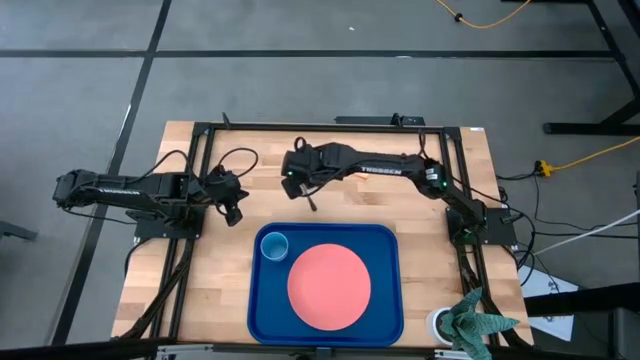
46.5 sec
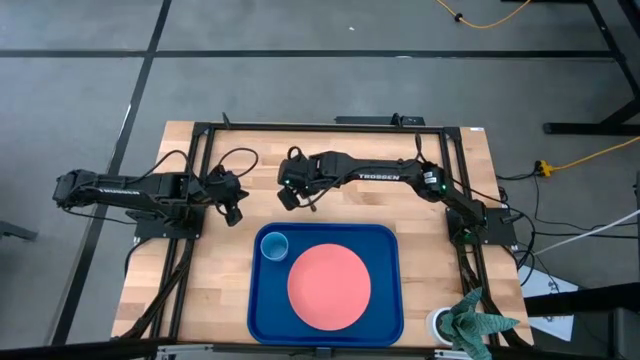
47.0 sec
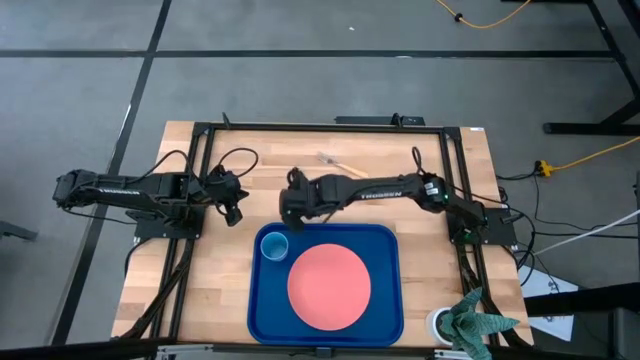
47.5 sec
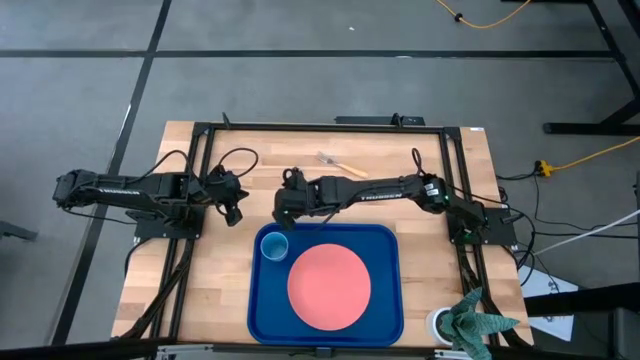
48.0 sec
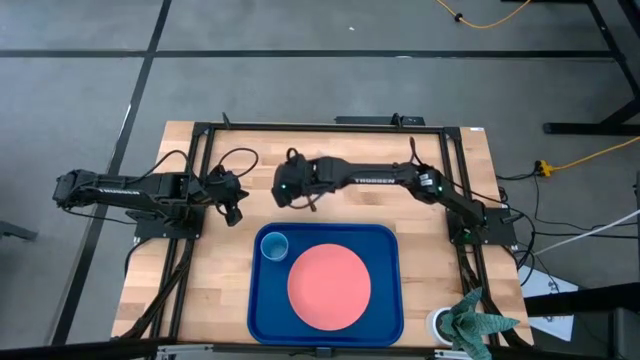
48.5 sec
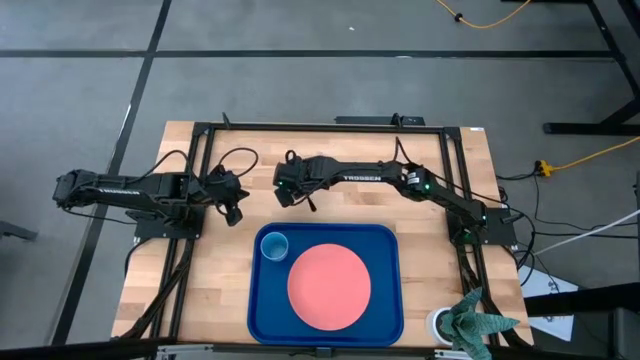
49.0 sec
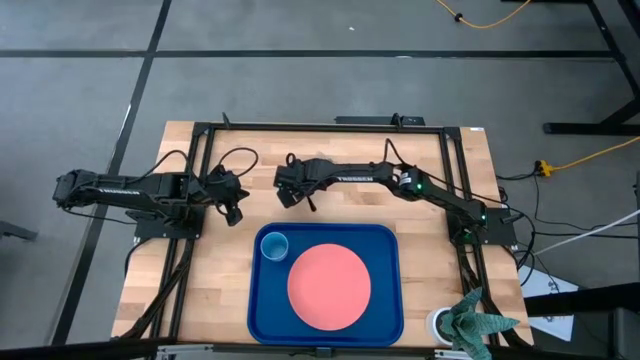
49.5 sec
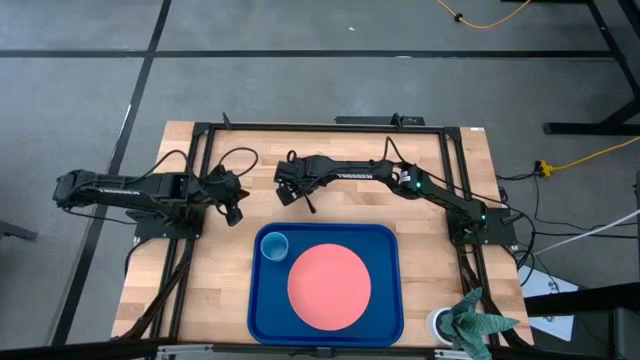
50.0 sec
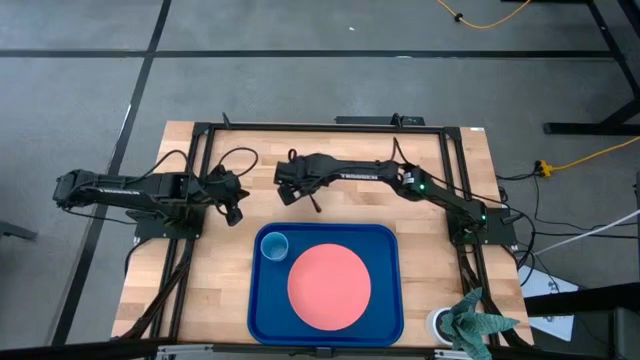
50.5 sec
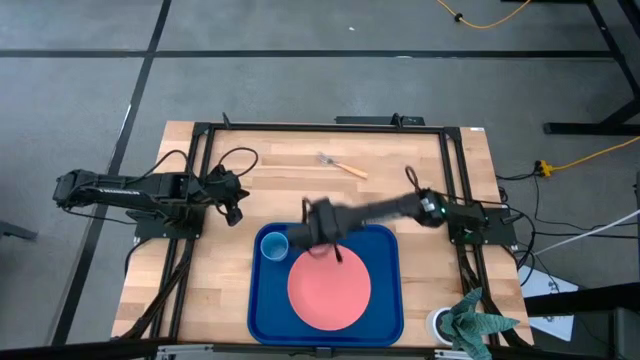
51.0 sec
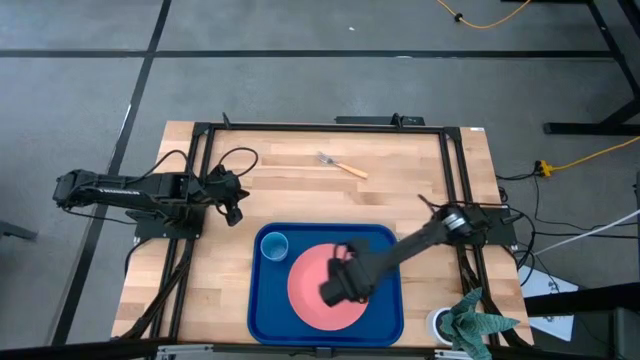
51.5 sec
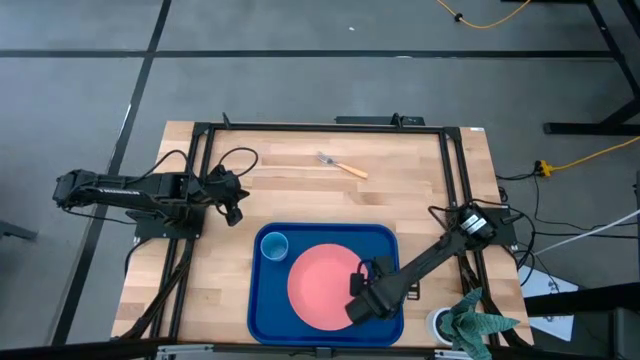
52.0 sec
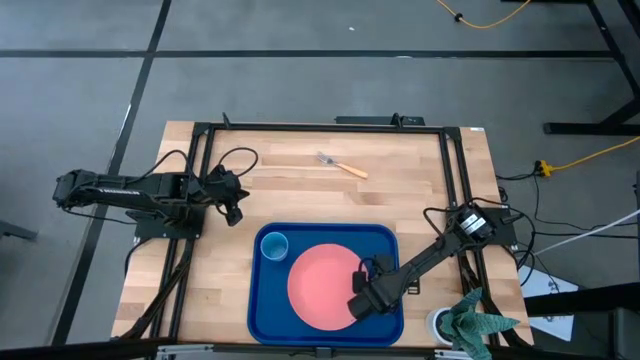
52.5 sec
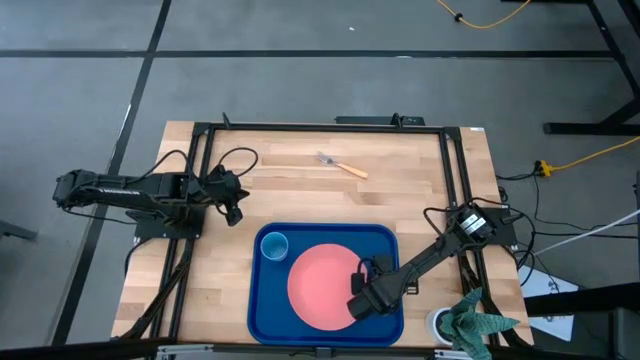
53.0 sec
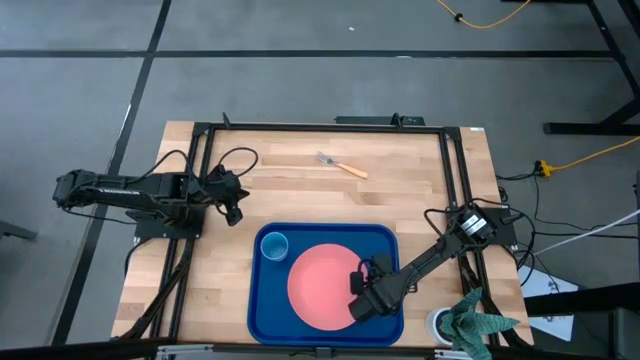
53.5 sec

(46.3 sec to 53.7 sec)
Task: Pick and place plate/cup/fork/spoon on tray
Put the black spoon on the blue tray to the right of the pink plate

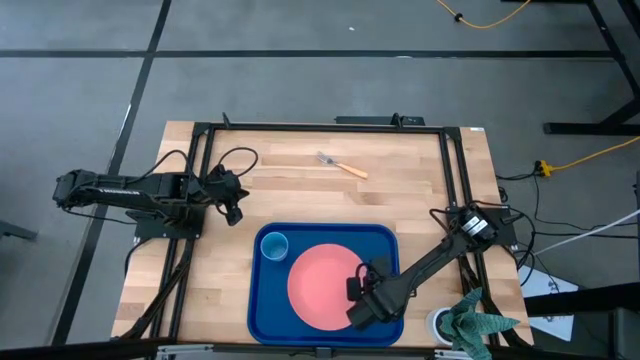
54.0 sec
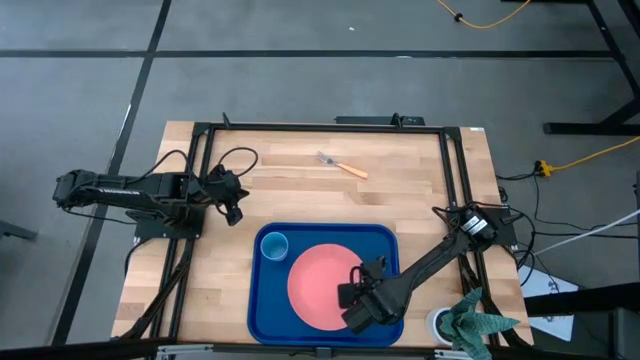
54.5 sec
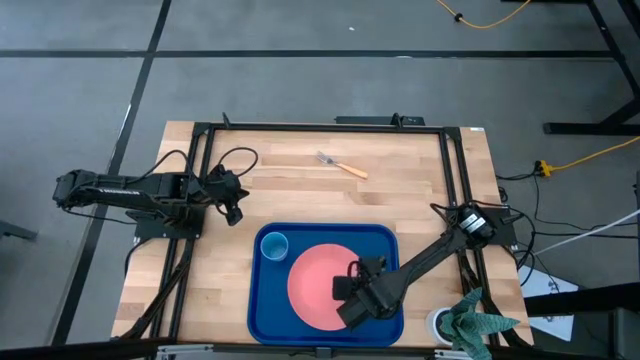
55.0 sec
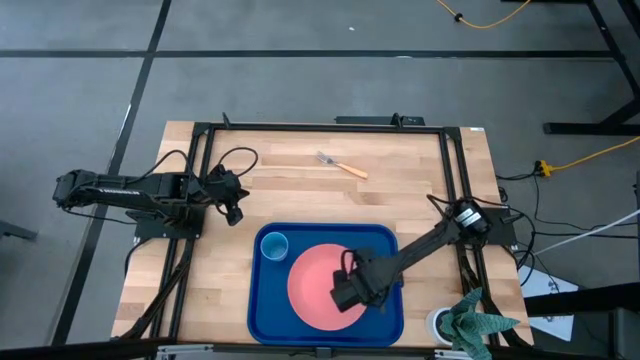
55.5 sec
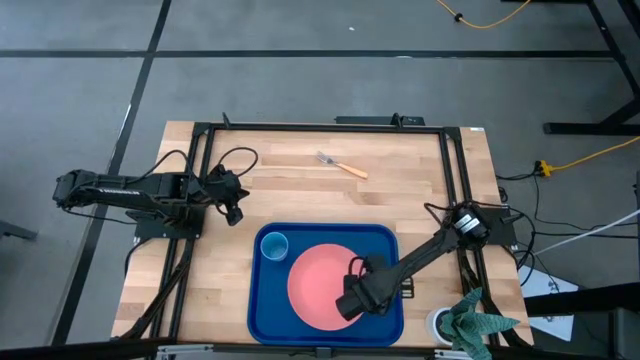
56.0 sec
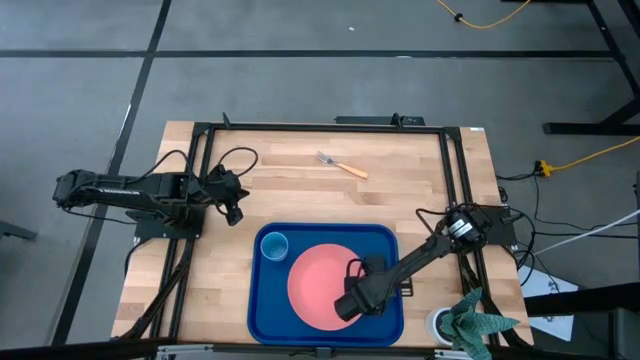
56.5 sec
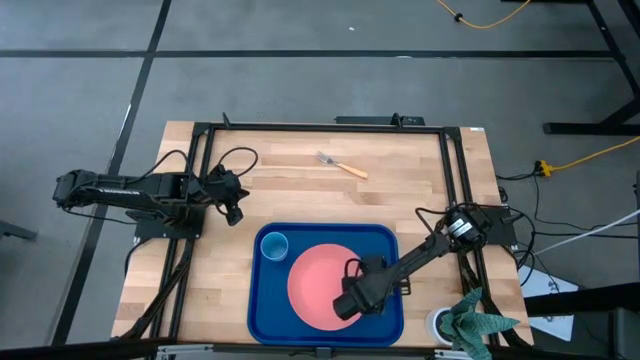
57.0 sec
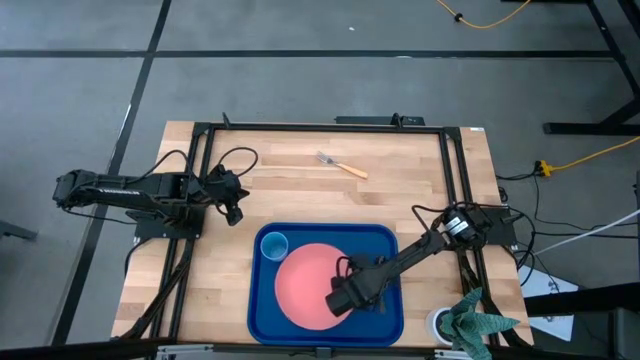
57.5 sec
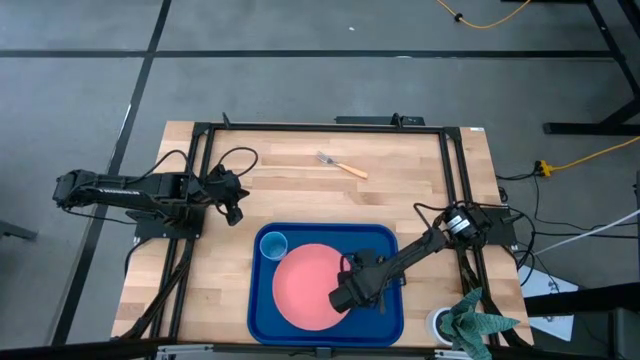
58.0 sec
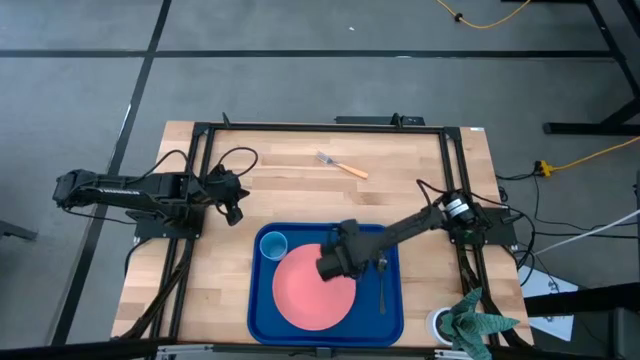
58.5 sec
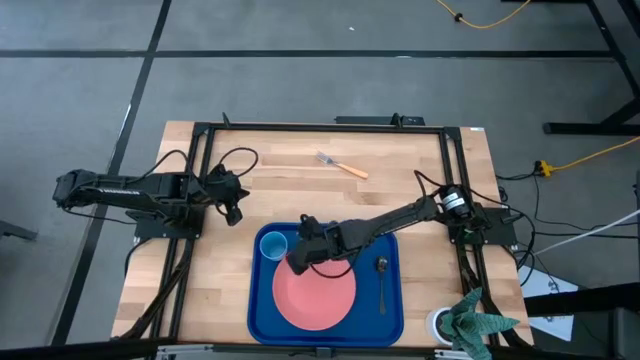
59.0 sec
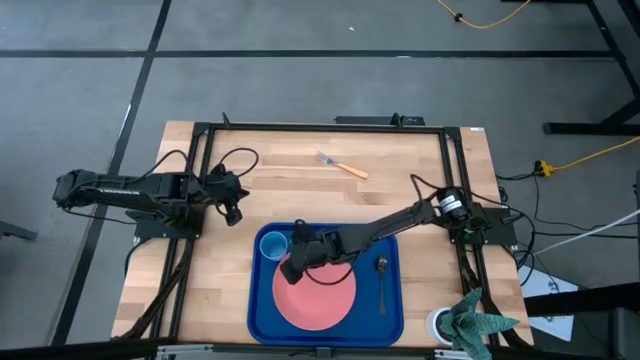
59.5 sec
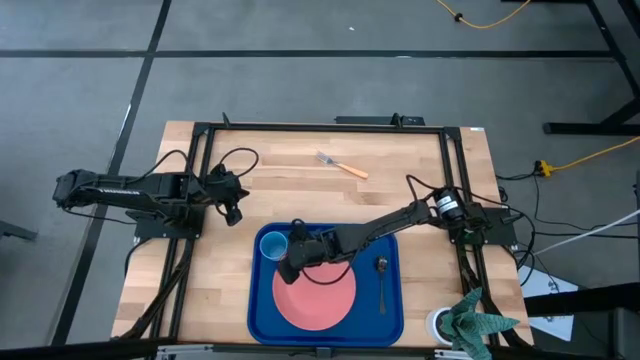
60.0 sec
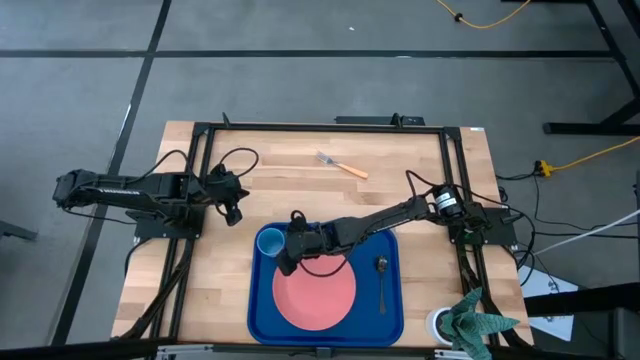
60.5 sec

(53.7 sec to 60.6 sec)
Adjust the pink plate and blue cup on the blue tray

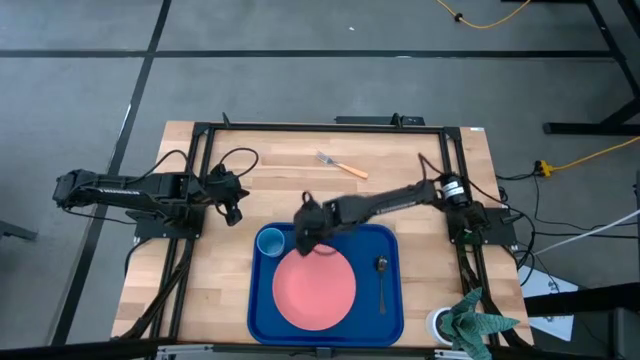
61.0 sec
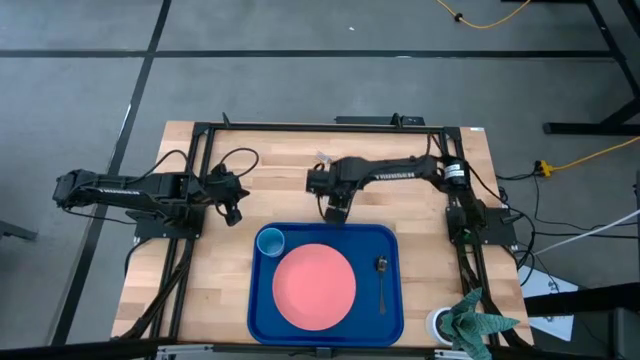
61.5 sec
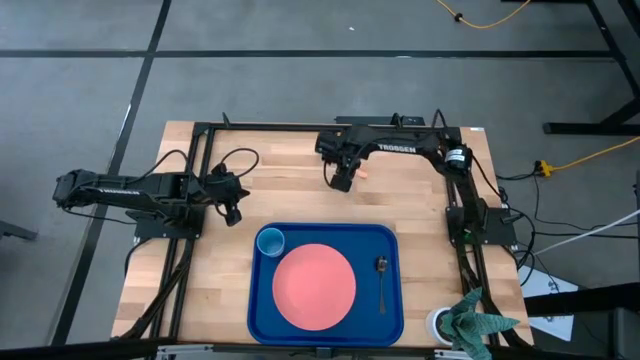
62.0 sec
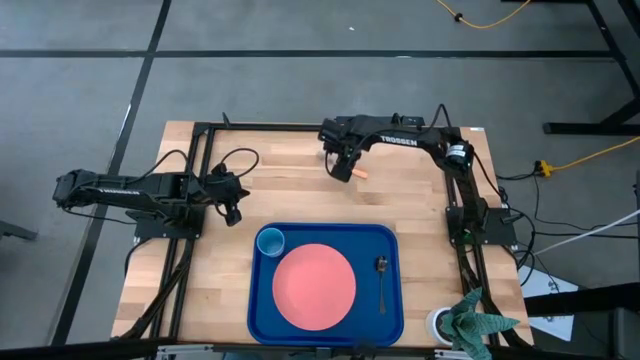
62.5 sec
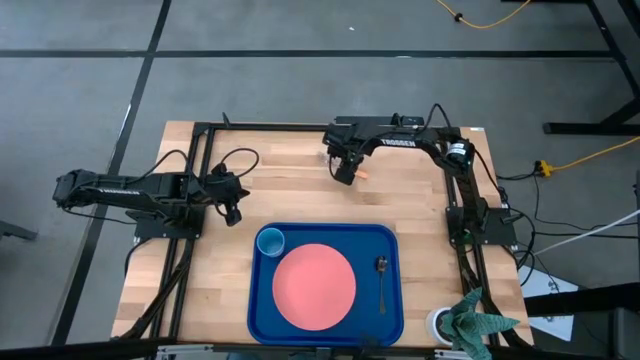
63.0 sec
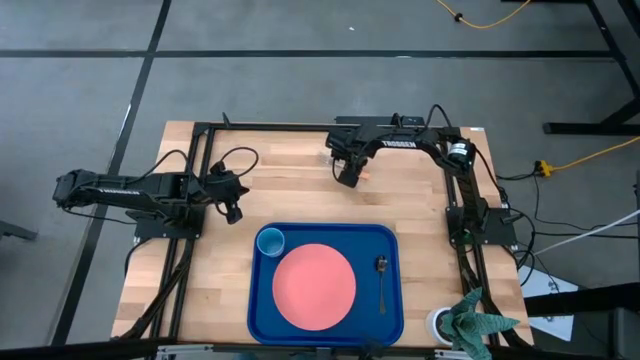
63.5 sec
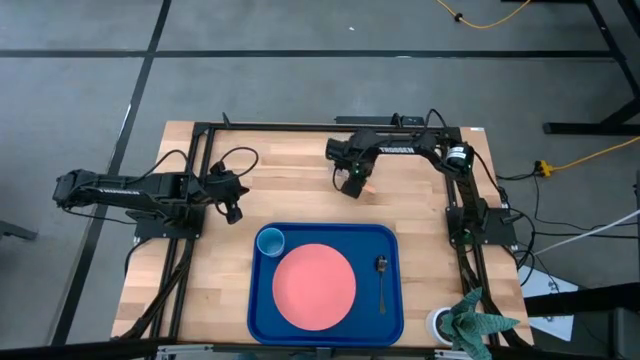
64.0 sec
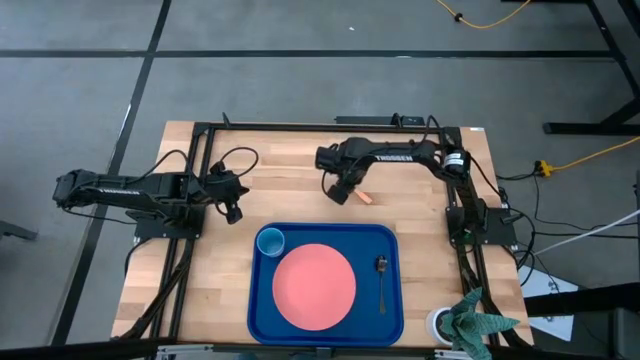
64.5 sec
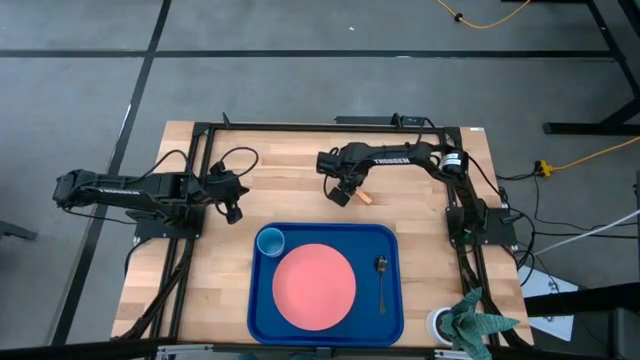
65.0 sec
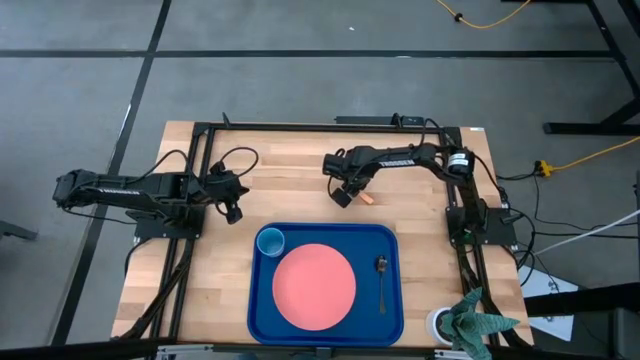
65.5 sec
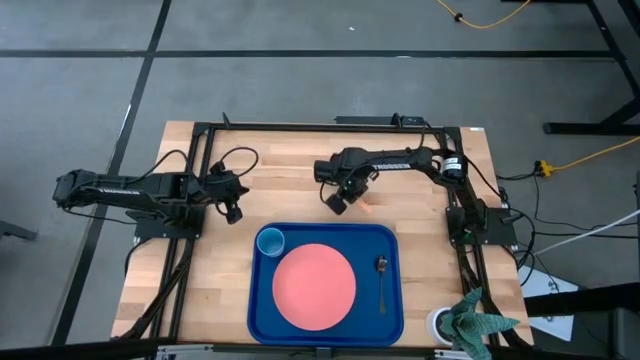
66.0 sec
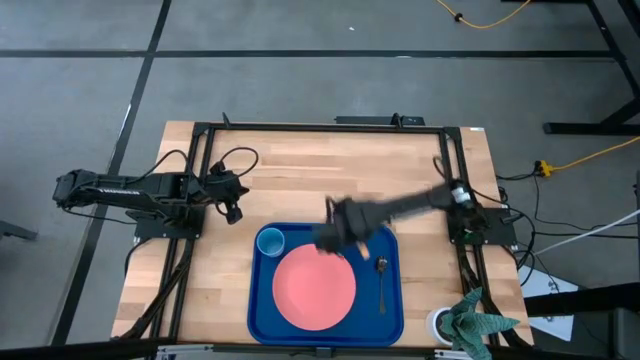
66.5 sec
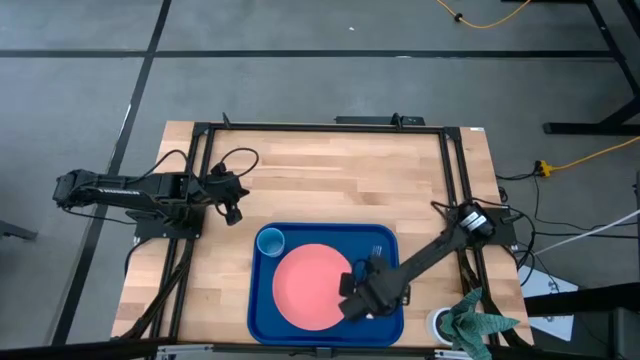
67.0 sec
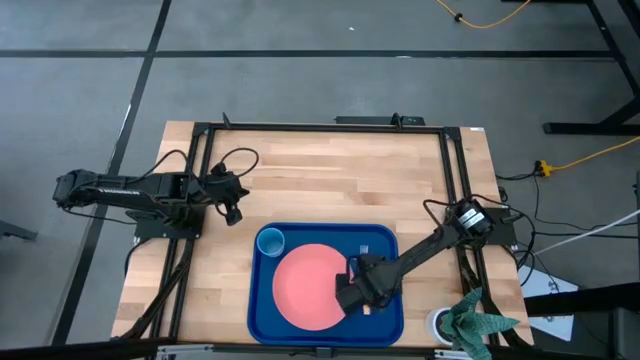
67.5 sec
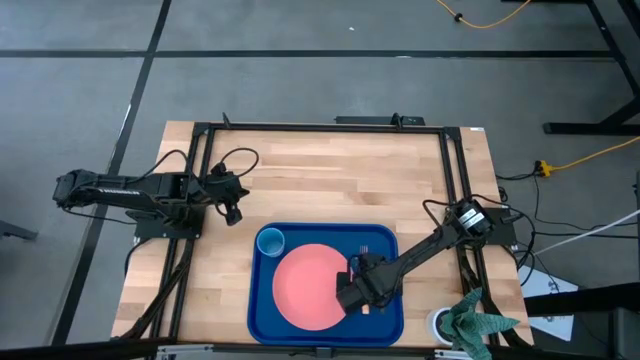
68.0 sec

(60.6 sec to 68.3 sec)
Put the orange fork on the blue serving tray between the pink plate and black spoon
